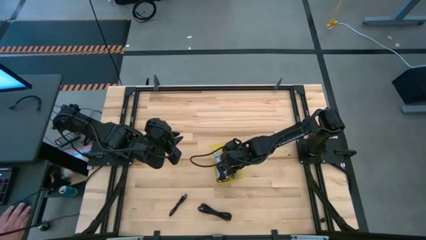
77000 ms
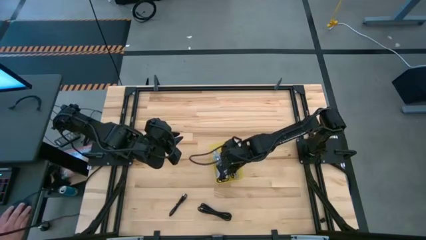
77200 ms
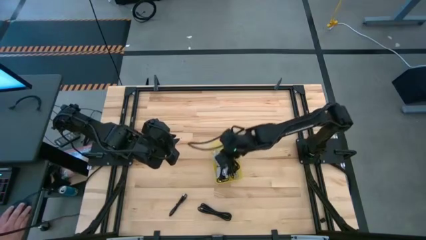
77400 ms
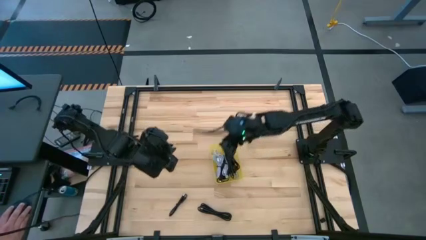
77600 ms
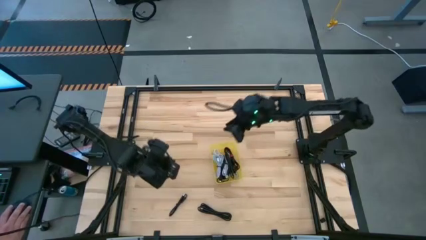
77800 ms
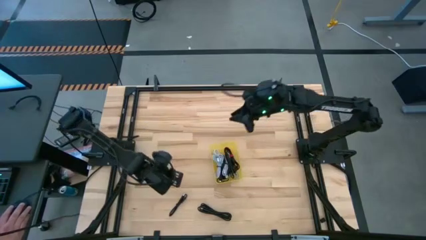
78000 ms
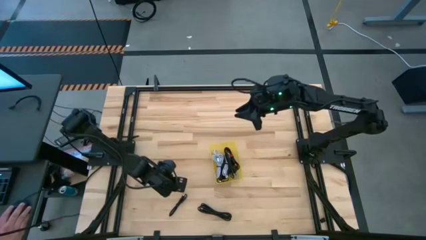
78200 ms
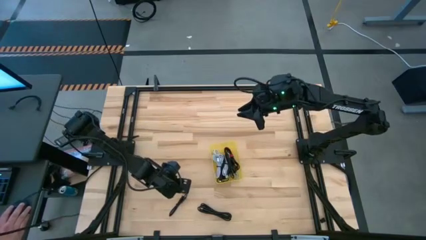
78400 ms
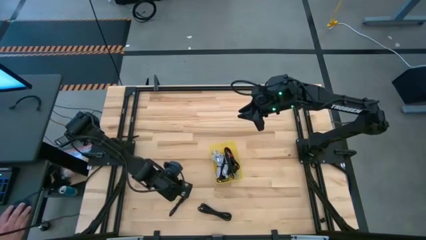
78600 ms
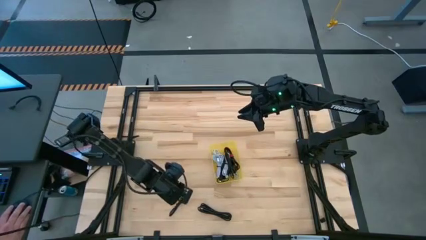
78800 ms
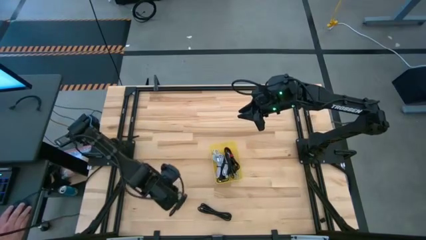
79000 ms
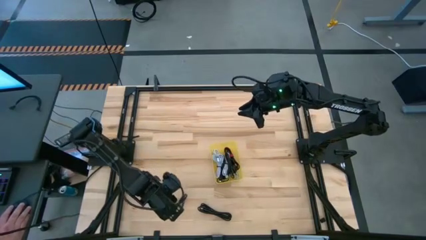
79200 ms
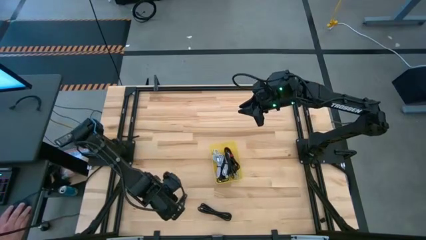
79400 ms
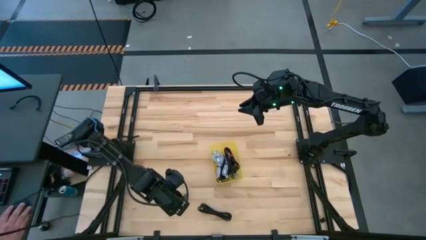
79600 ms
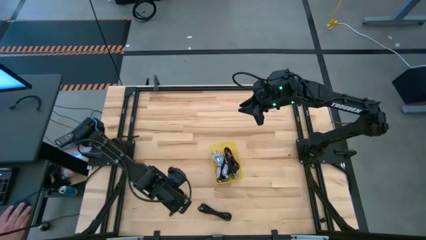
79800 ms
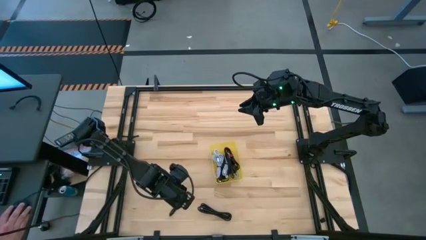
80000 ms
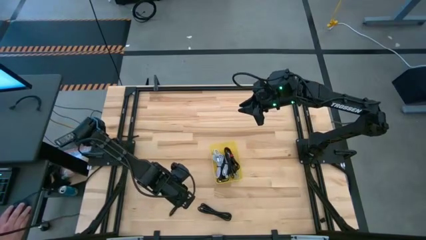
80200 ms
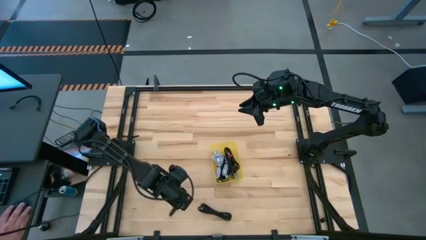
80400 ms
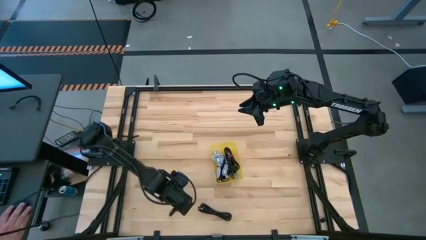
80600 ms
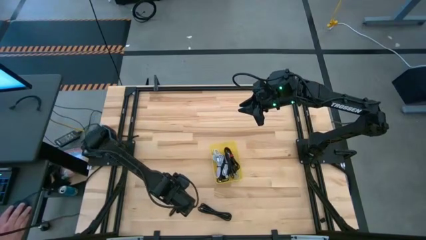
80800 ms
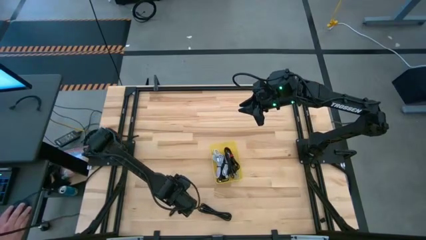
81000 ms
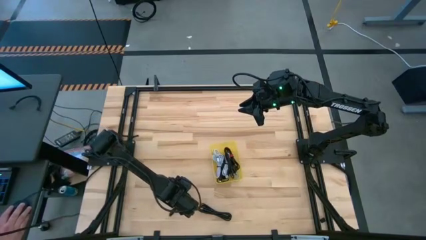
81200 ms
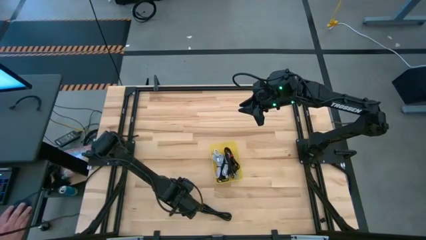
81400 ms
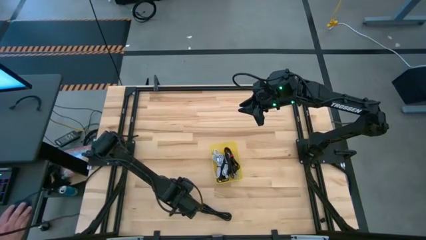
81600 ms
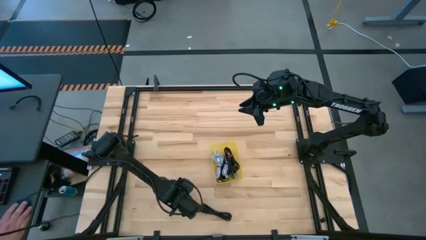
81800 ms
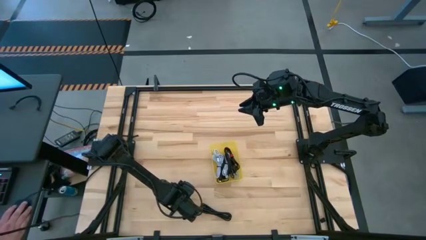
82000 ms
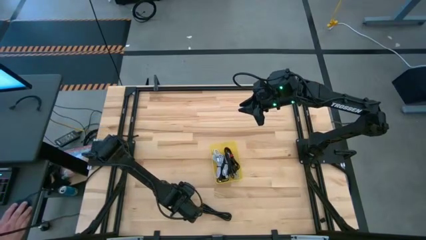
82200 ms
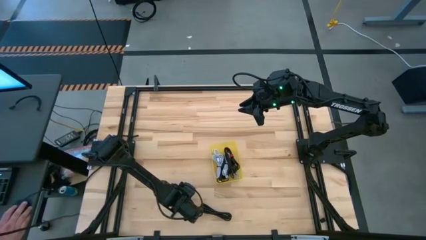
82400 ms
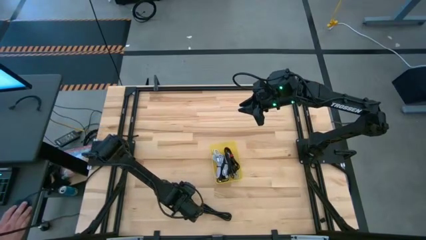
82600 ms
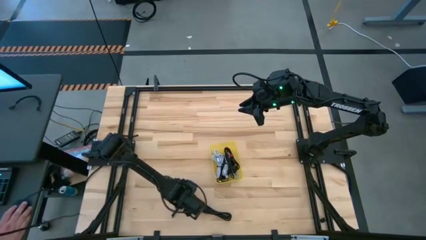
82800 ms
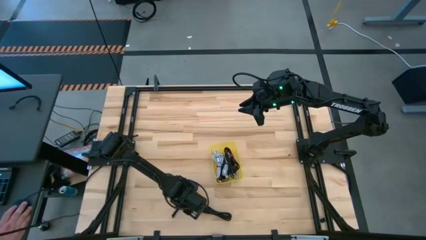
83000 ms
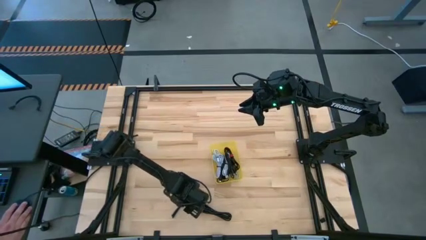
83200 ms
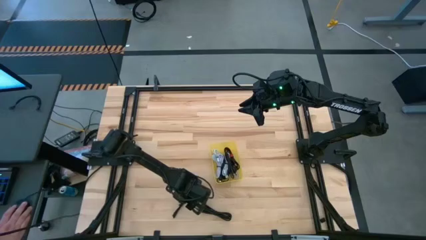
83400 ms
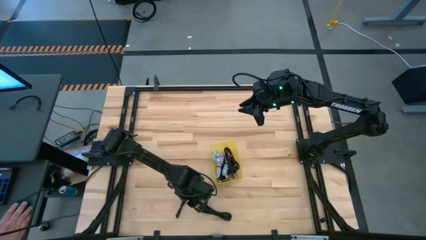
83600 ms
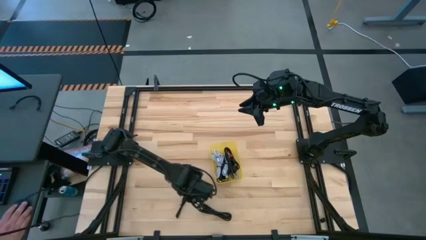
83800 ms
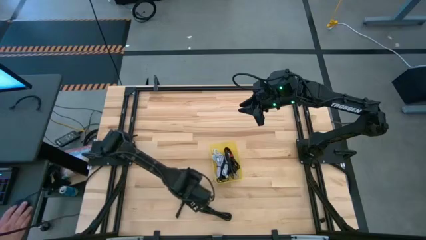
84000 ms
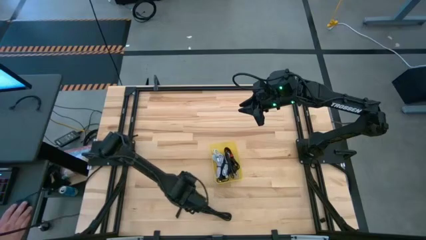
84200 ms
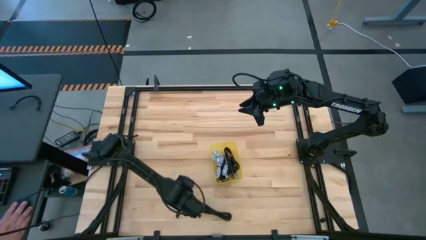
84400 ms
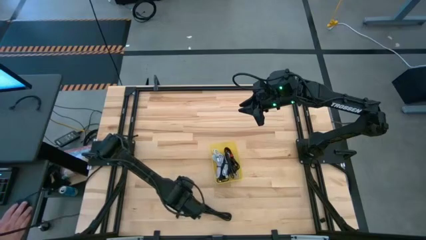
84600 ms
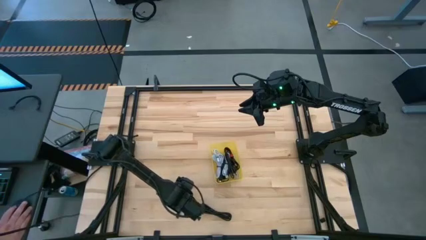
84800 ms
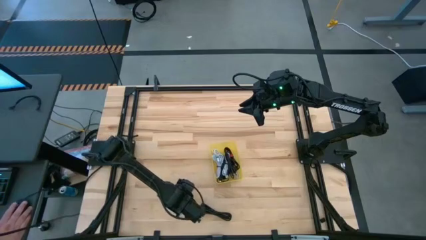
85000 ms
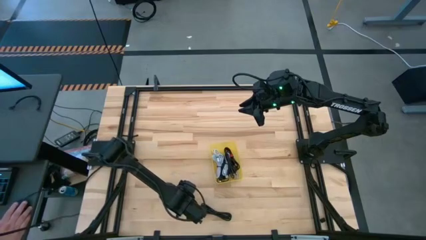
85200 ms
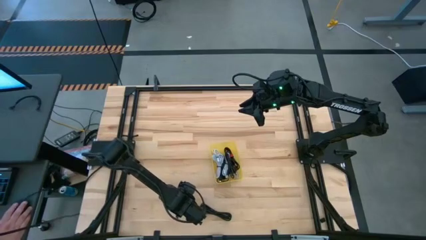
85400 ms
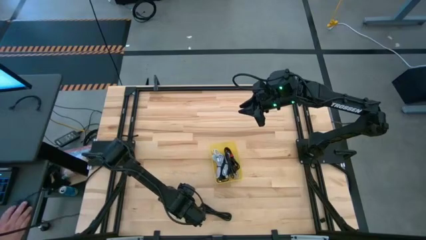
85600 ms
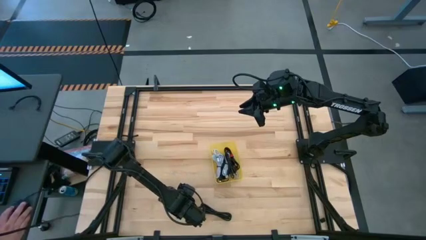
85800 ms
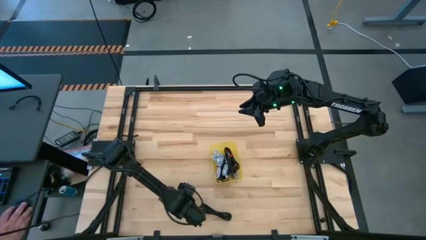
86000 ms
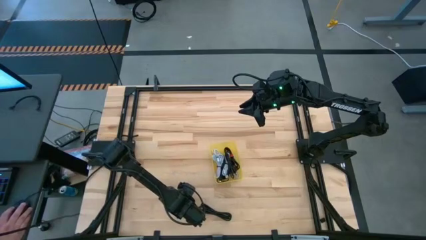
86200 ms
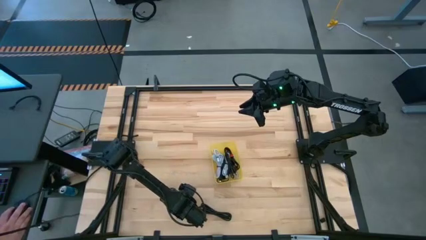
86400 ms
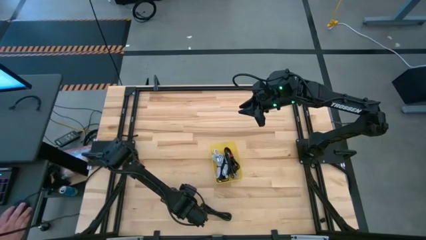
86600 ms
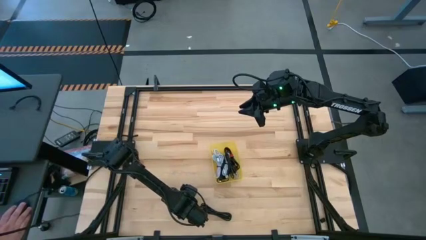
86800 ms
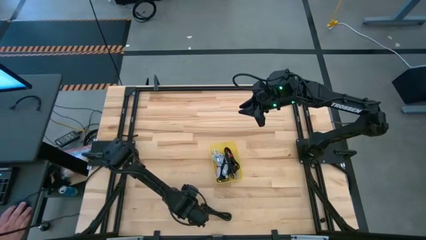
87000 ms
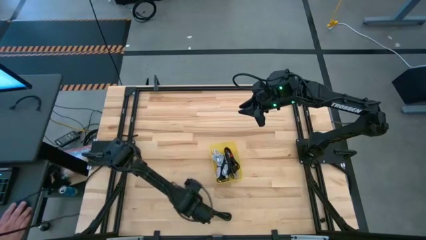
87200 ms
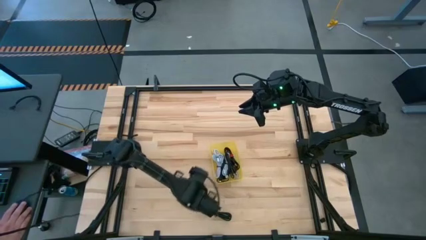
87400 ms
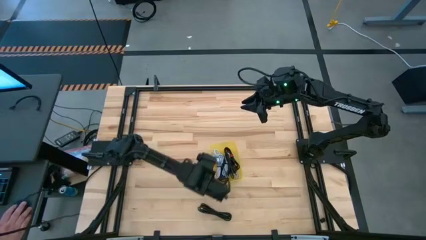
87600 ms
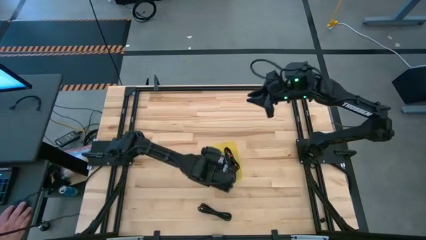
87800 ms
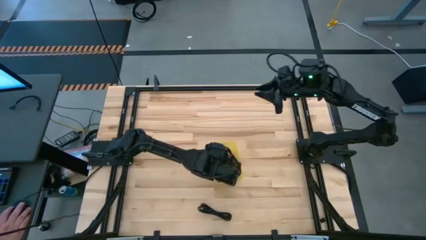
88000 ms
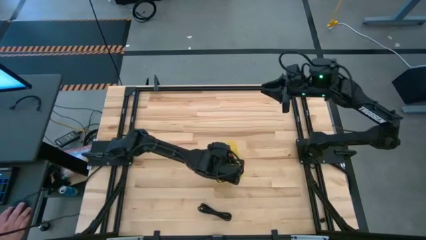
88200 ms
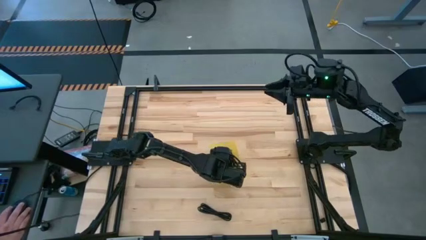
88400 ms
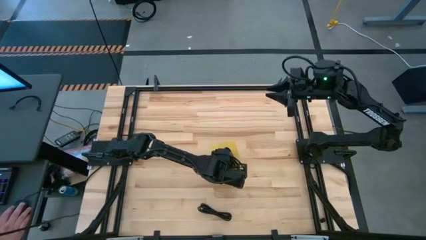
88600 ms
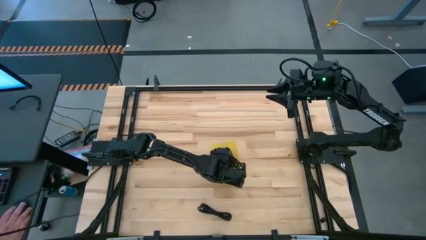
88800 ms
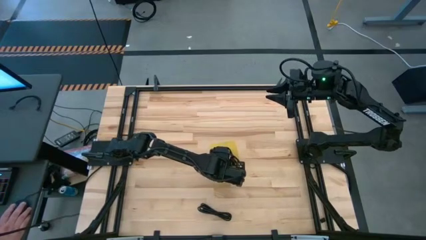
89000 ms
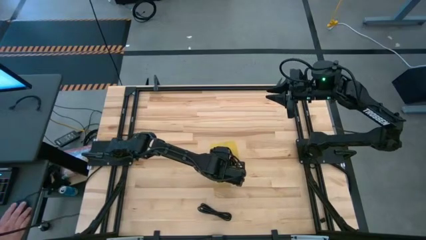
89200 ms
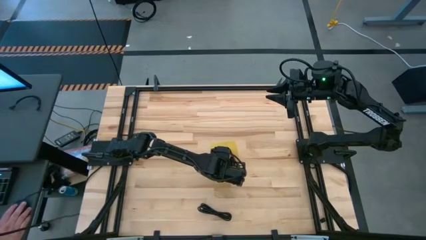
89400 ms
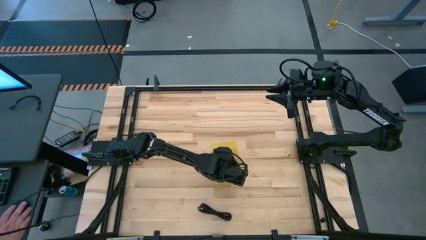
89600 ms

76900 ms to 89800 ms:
Task: Pick and place USB-C Cables
Put the black charger cable into the yellow bin

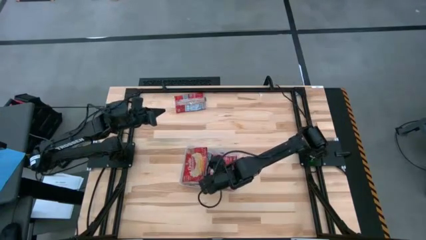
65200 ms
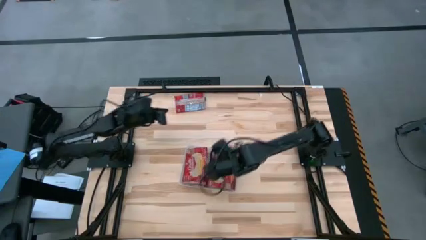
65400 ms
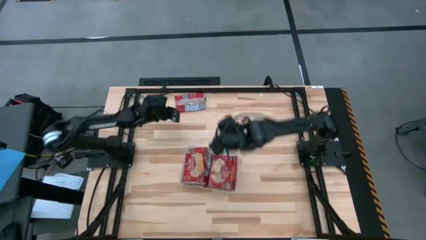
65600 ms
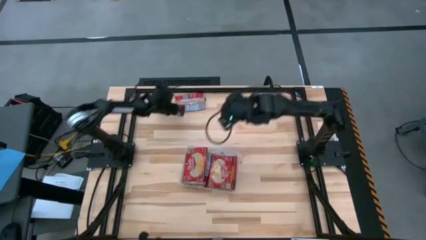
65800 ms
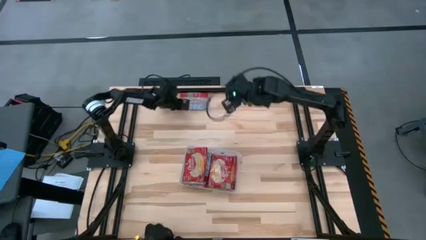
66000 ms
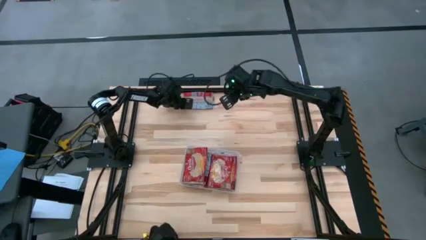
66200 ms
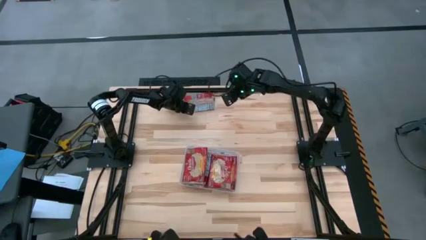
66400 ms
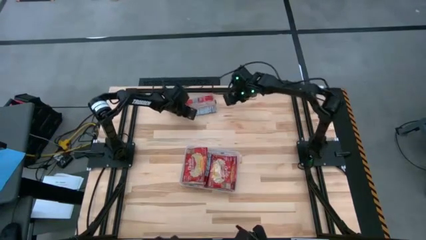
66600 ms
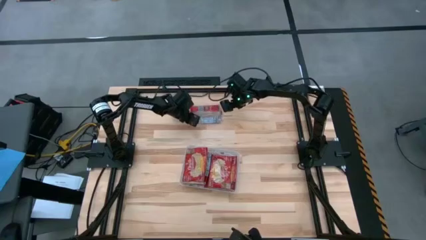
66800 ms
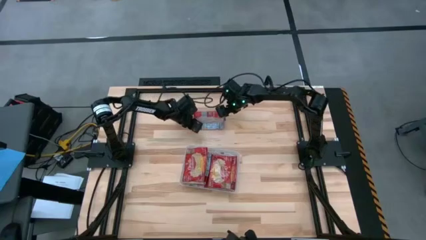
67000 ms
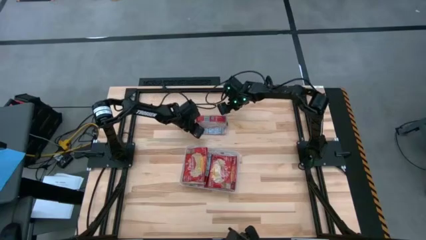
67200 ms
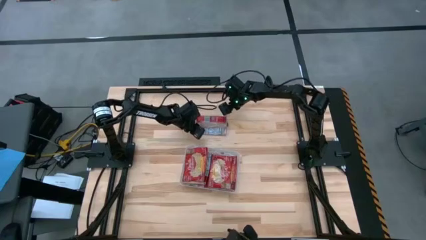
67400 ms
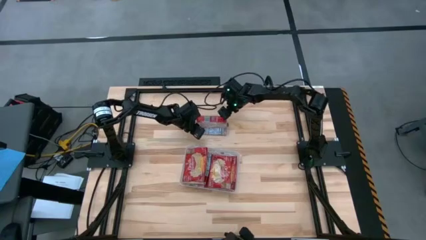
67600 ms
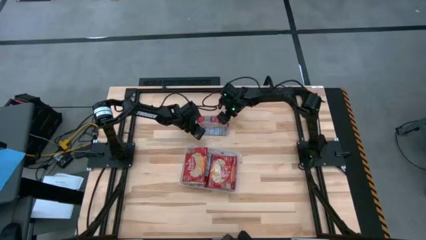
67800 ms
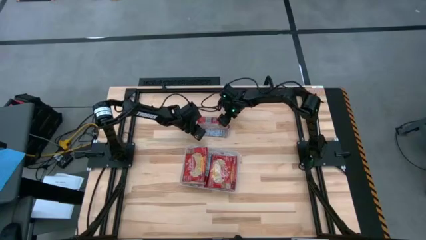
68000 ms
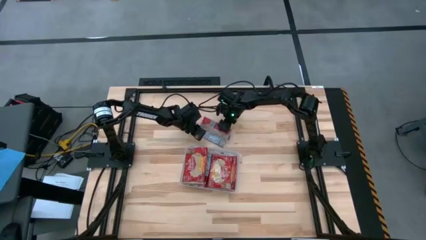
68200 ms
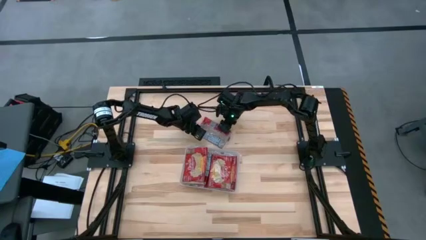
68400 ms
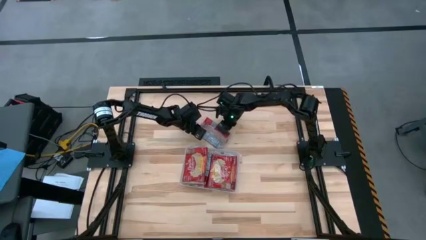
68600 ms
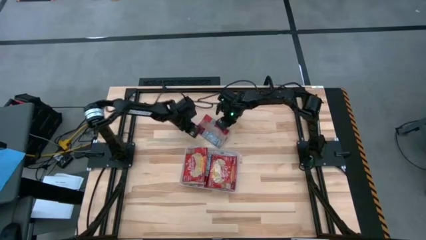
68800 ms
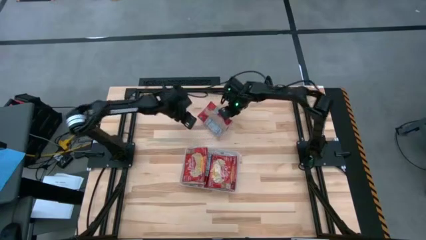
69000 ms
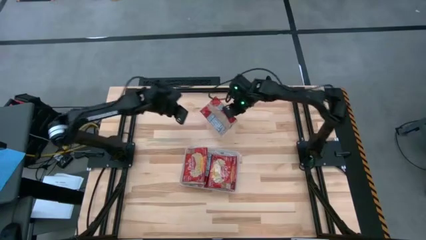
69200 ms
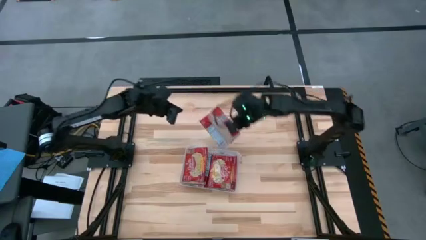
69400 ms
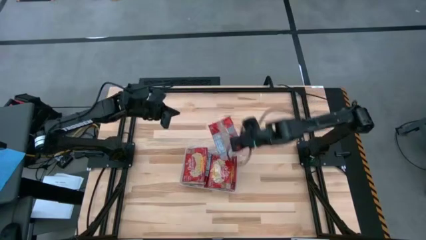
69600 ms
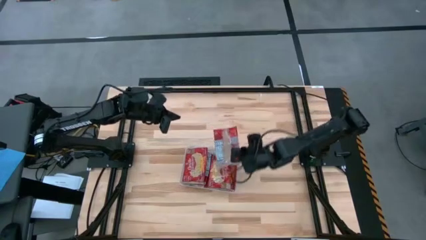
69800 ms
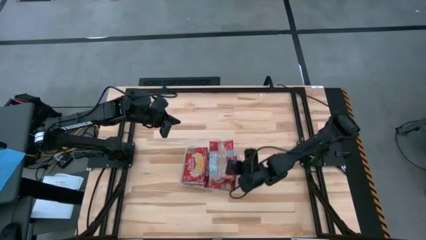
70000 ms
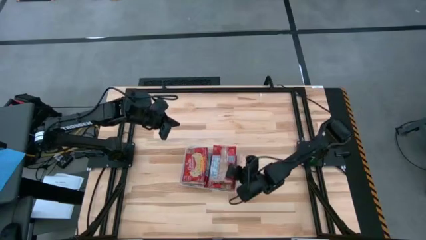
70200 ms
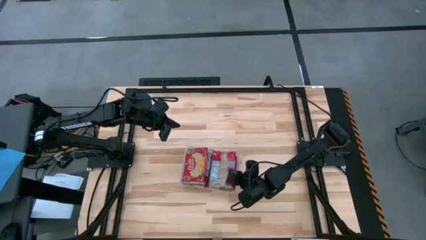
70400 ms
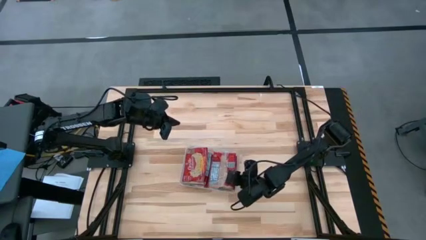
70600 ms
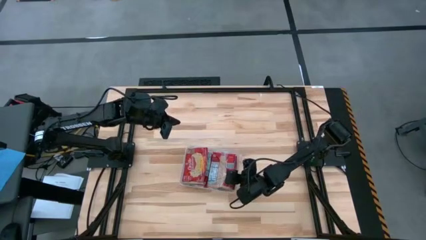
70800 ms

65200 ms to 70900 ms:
Task: Sort popcorn bags into baskets
Put the red popcorn bag into the transparent bin
